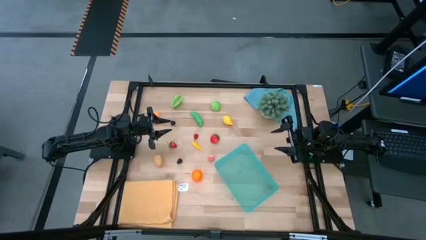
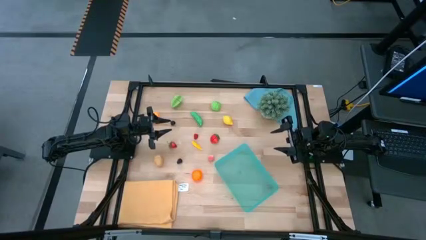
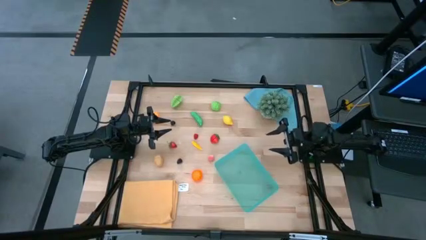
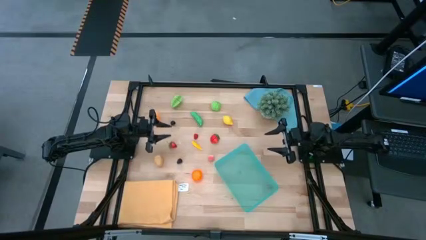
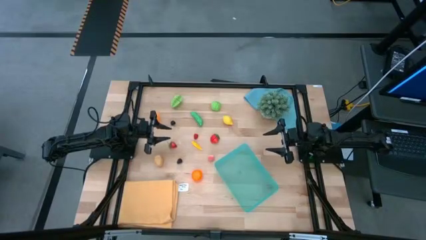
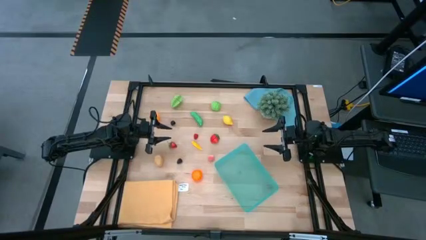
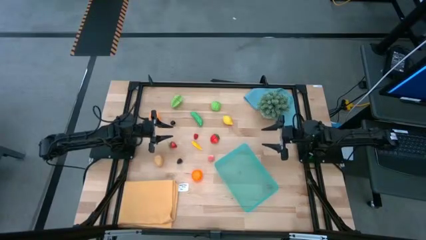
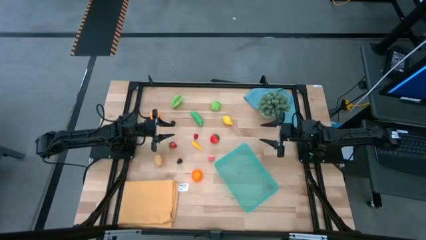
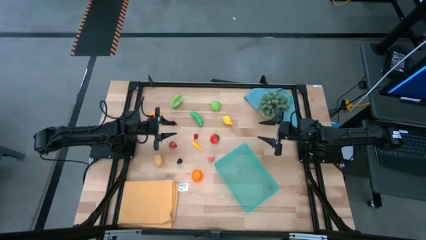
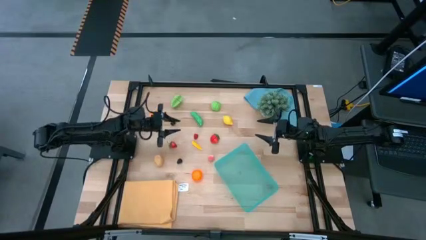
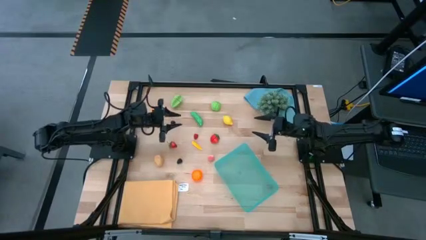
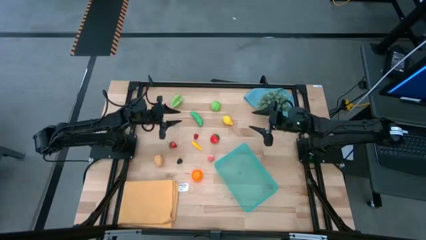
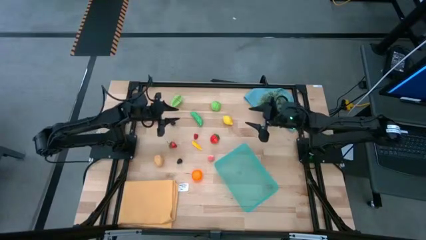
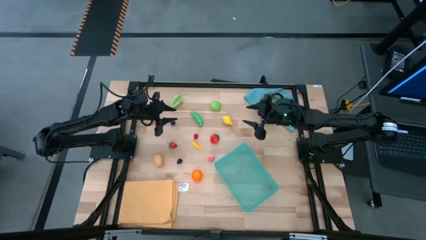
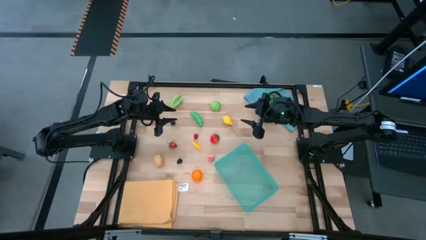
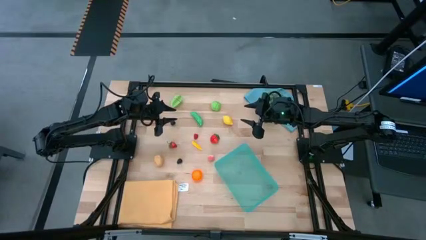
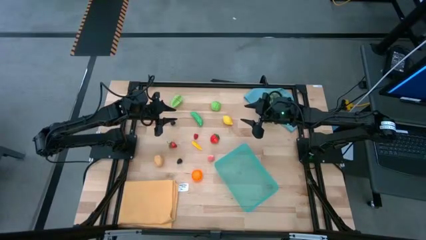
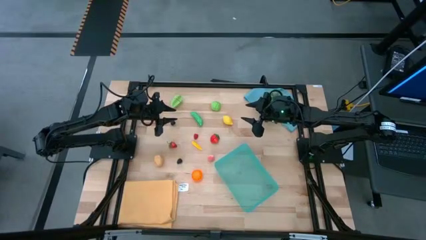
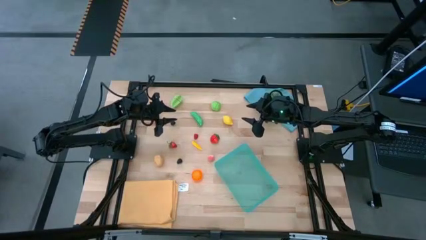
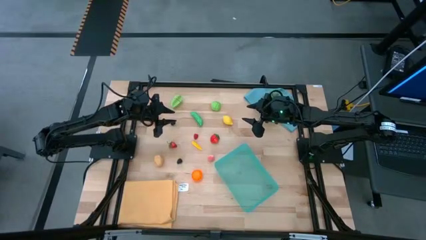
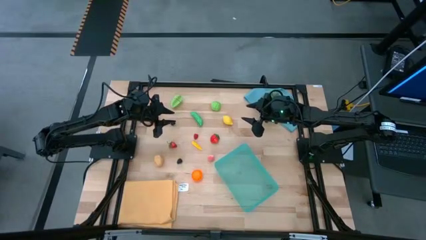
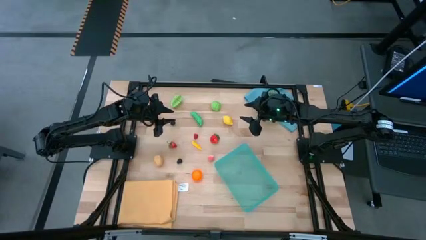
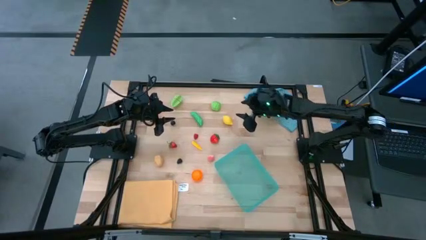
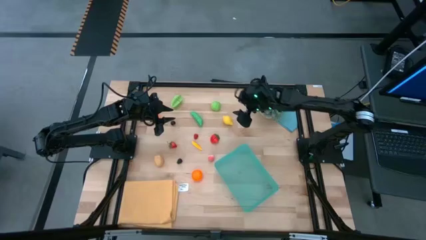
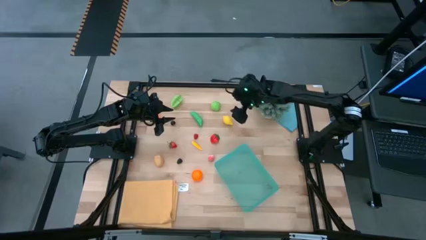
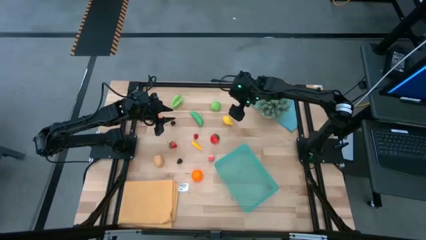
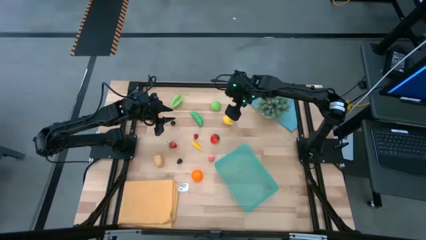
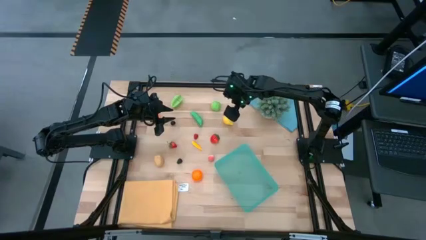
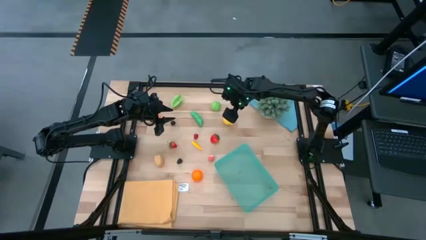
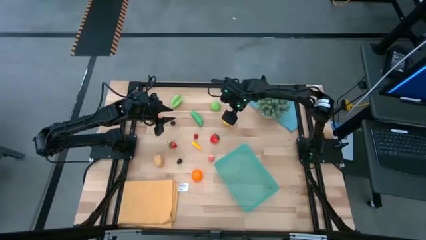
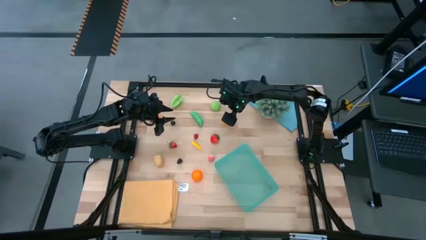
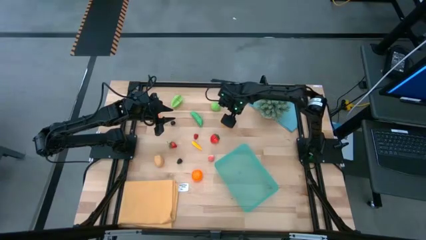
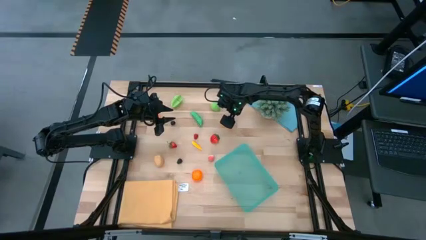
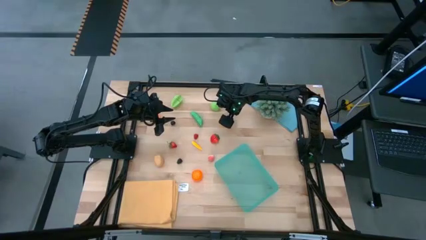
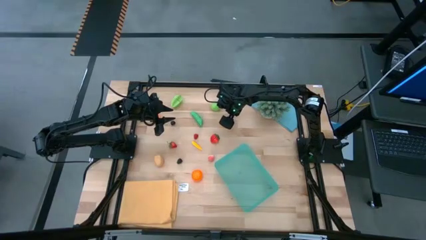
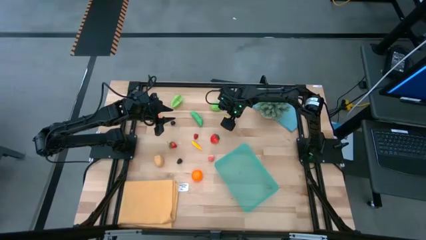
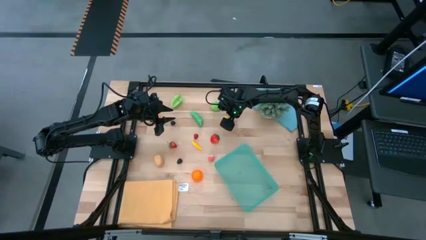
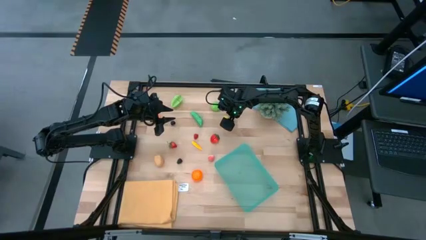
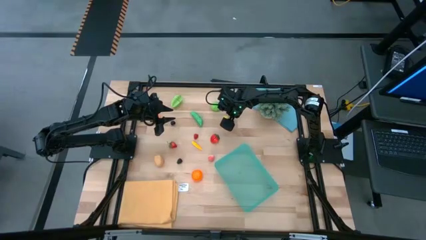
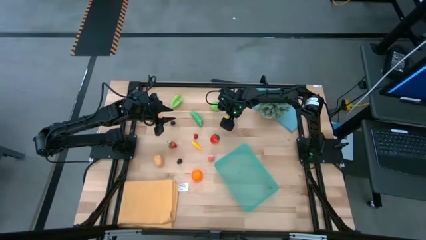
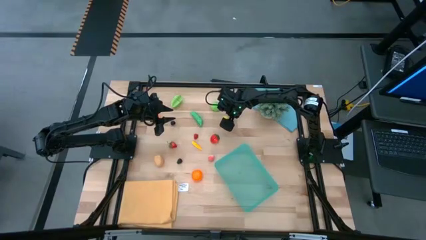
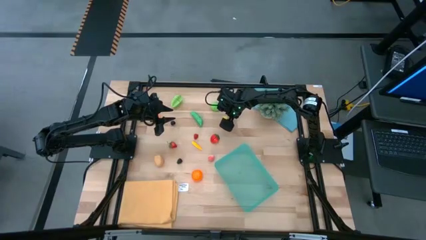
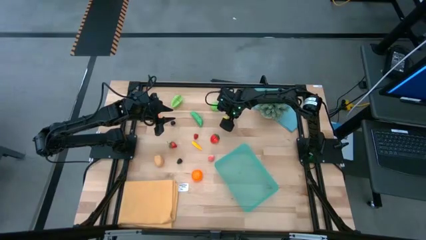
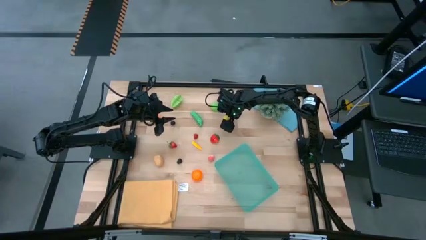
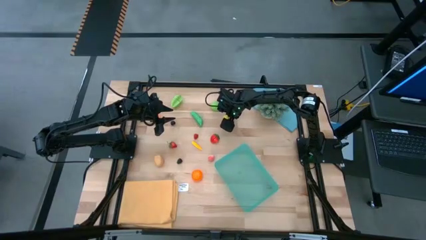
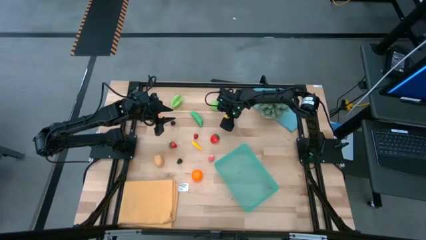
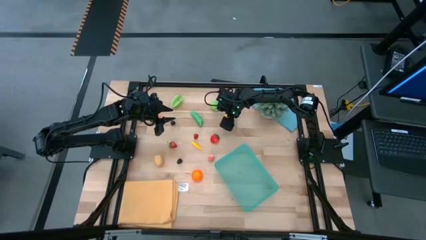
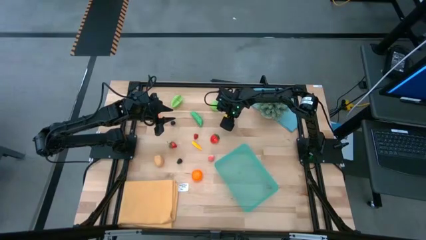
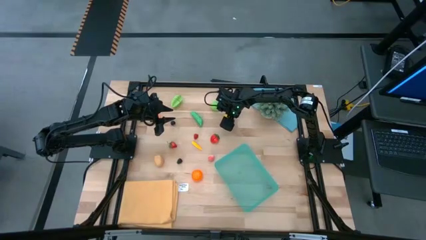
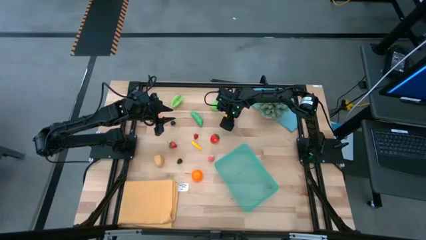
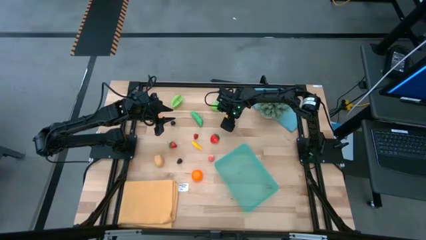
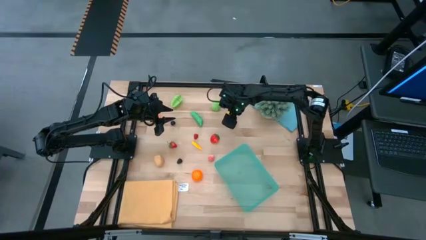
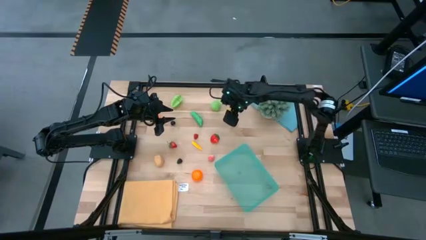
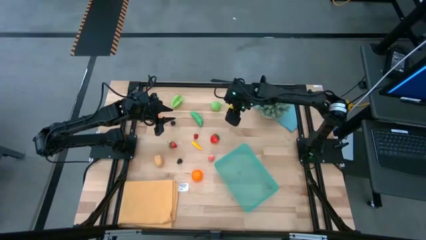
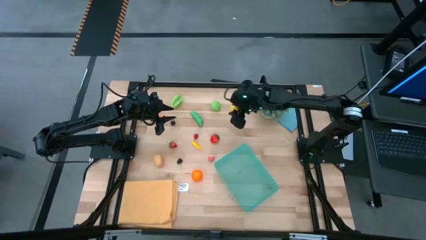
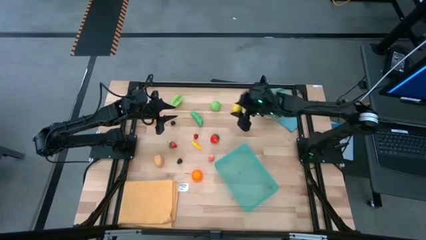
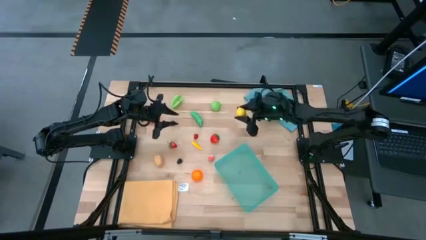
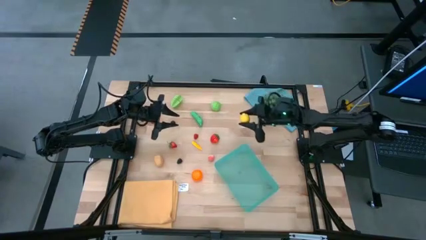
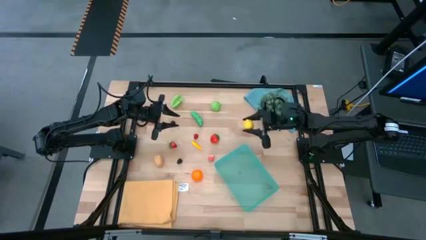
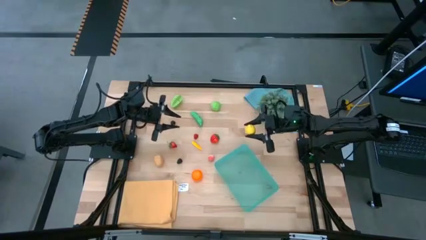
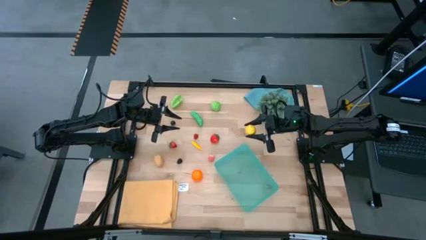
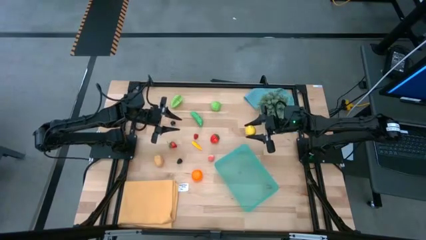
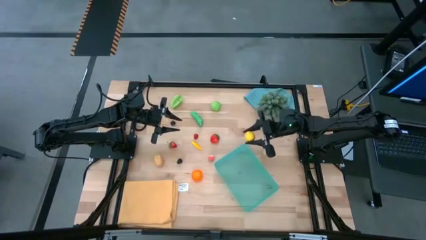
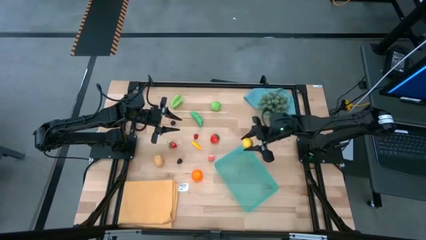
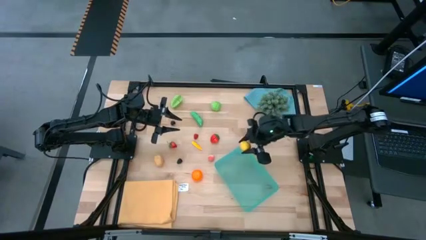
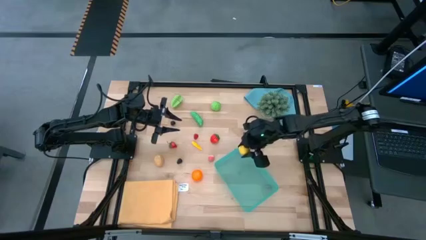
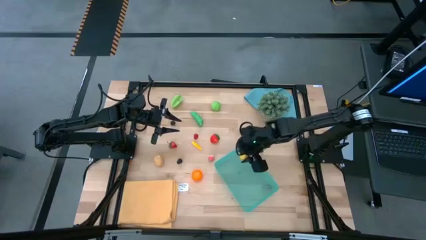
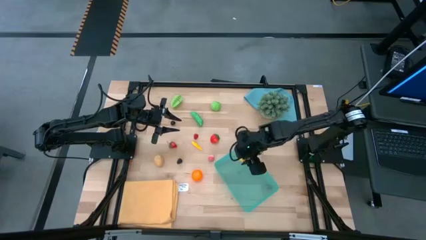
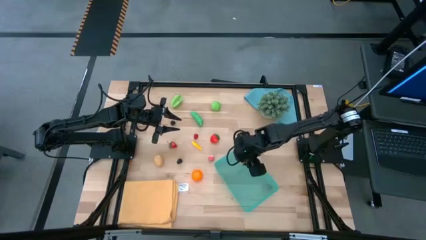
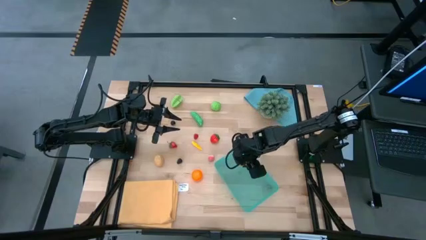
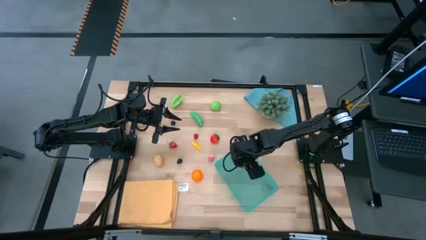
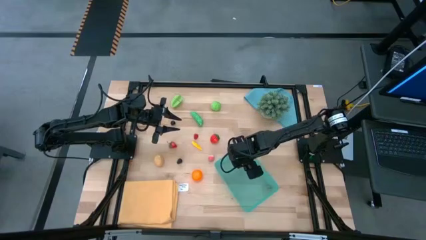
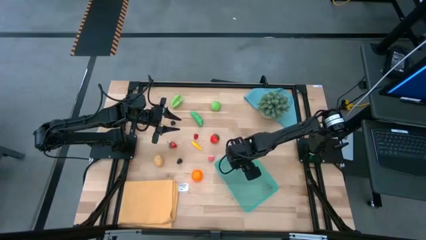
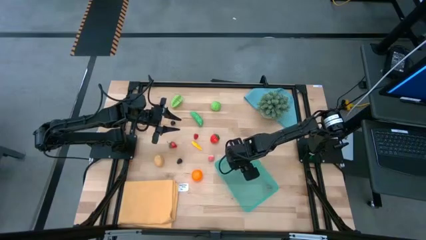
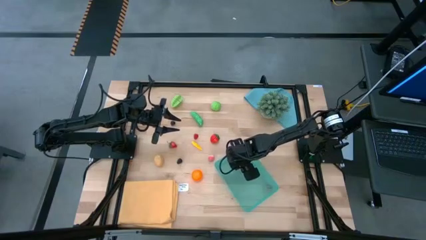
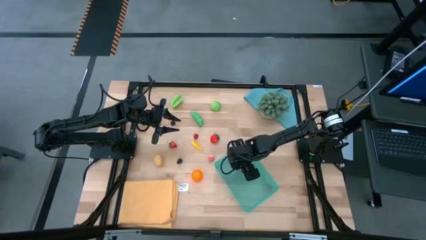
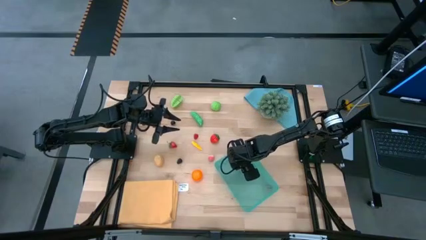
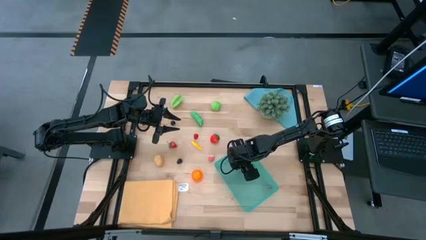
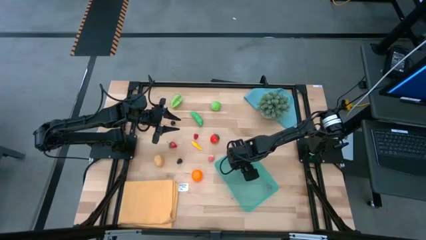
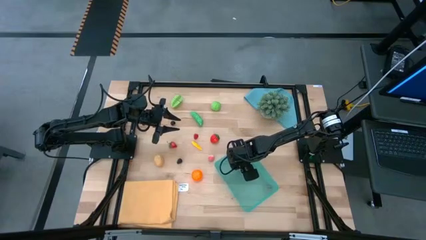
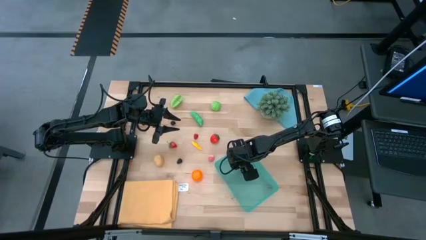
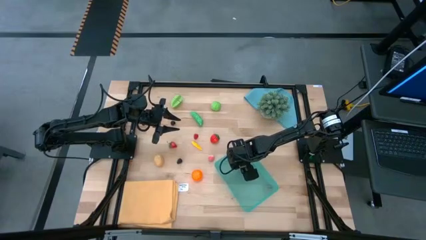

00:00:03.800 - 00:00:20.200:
Task: Pick and placing Produce into tupperware
Put the lemon into the green bin
